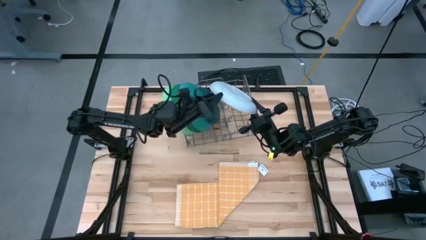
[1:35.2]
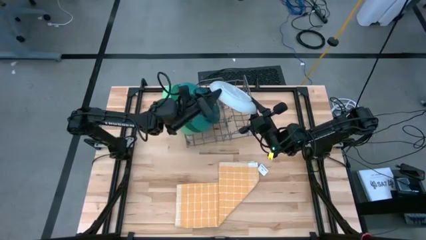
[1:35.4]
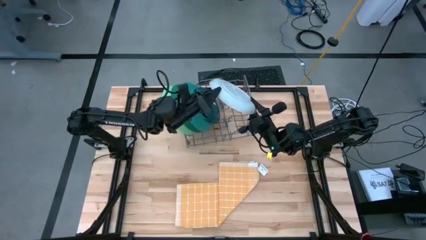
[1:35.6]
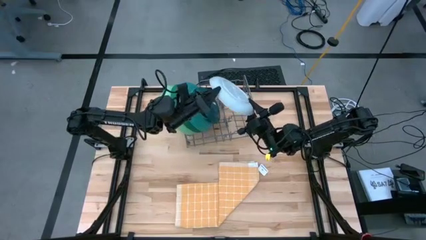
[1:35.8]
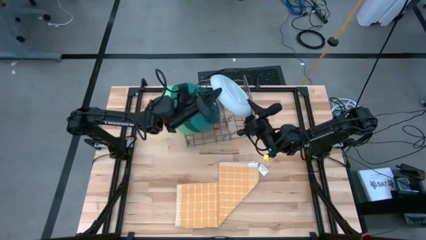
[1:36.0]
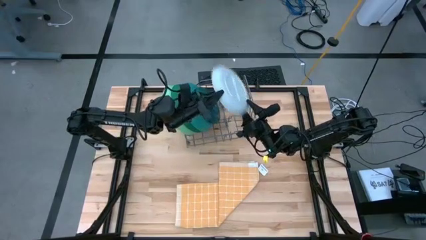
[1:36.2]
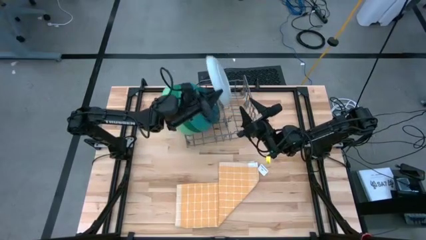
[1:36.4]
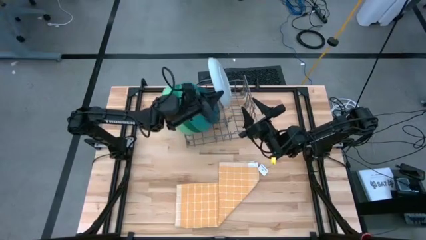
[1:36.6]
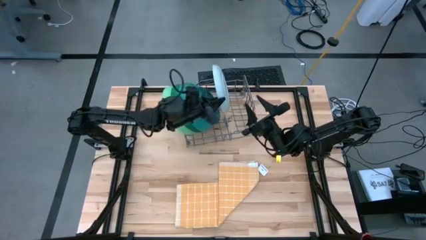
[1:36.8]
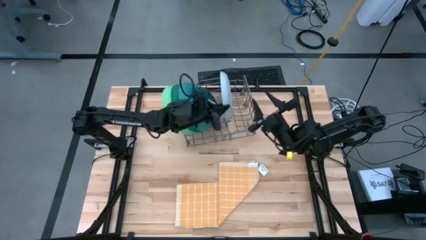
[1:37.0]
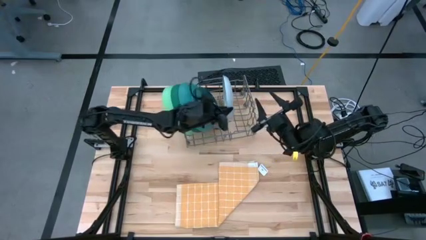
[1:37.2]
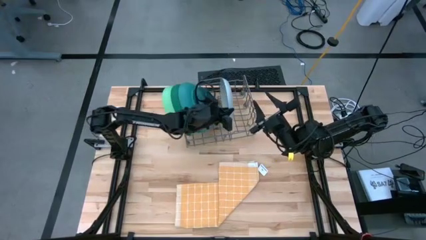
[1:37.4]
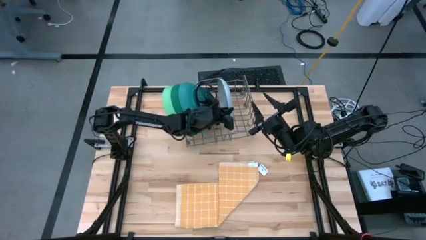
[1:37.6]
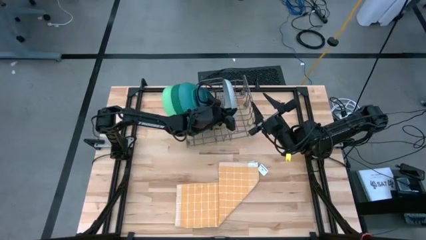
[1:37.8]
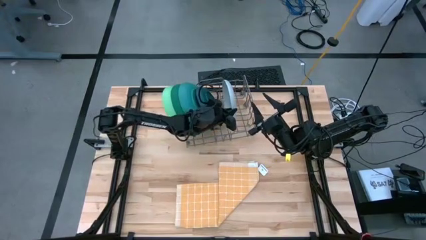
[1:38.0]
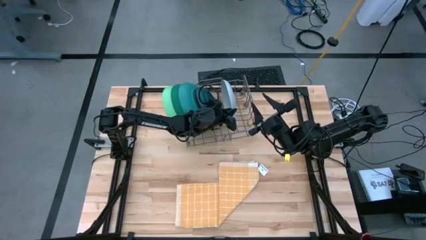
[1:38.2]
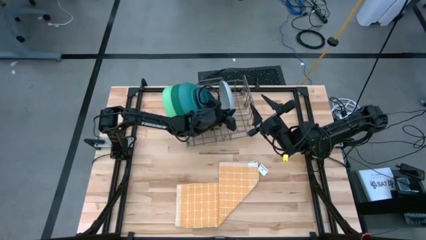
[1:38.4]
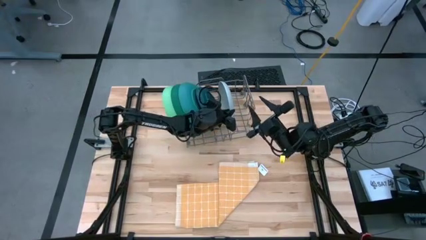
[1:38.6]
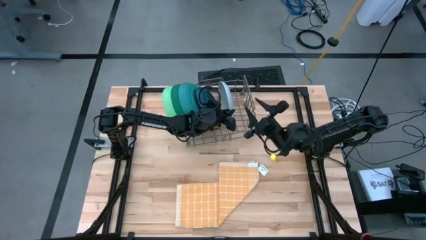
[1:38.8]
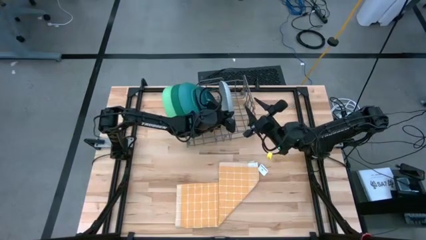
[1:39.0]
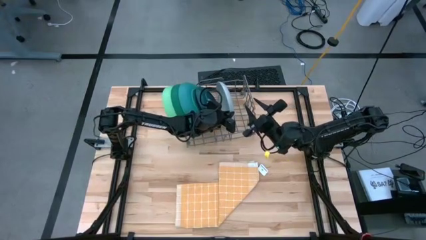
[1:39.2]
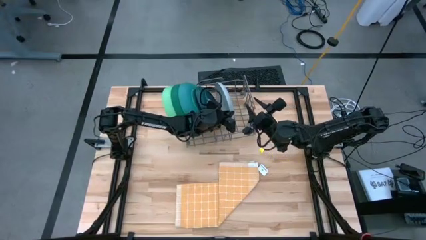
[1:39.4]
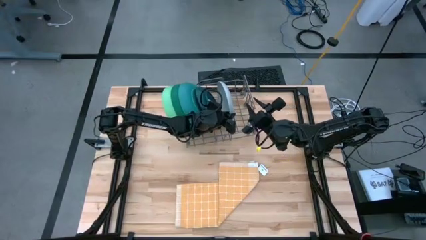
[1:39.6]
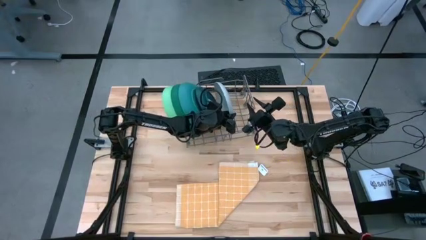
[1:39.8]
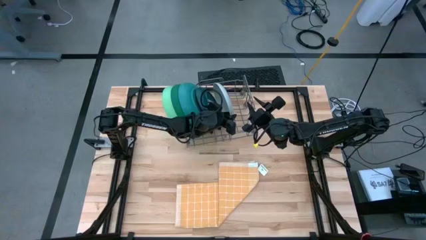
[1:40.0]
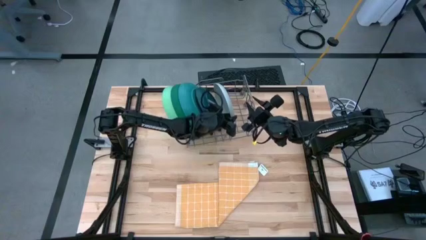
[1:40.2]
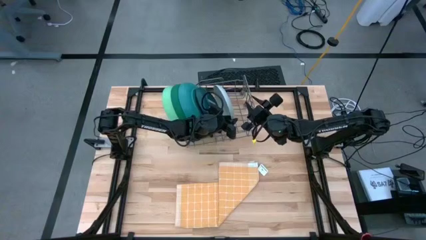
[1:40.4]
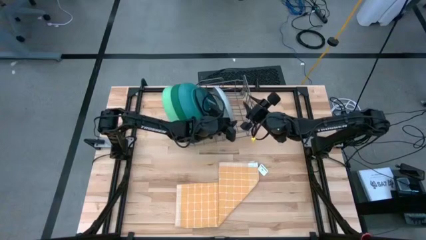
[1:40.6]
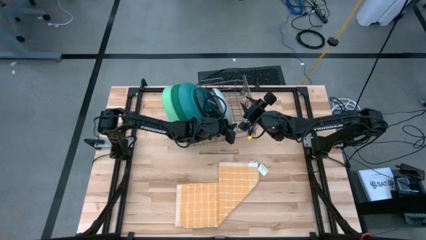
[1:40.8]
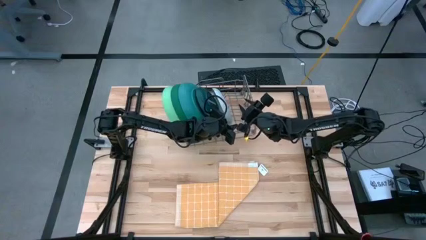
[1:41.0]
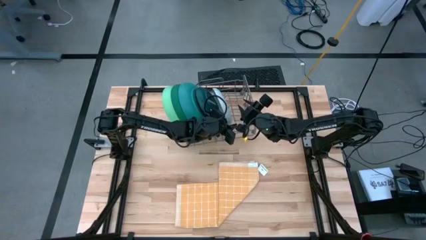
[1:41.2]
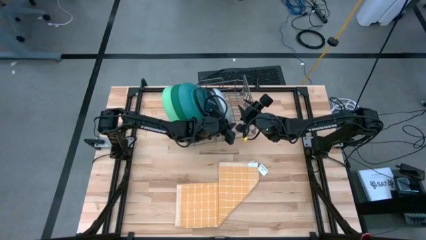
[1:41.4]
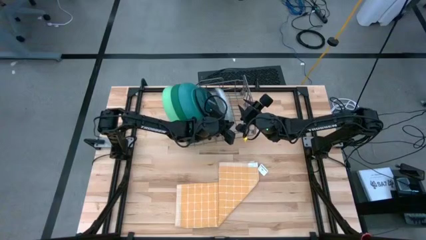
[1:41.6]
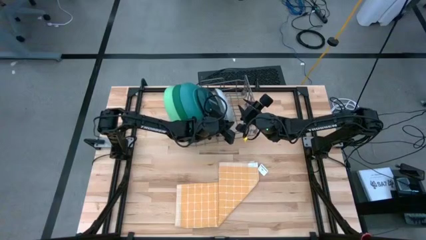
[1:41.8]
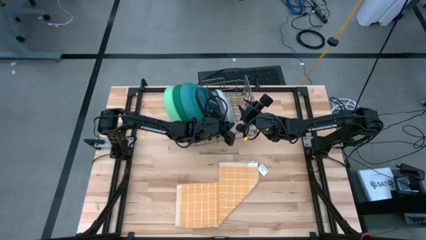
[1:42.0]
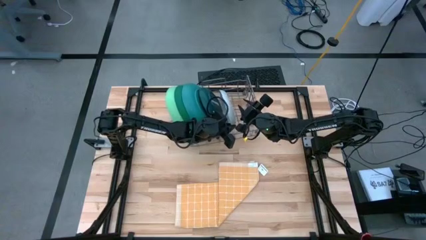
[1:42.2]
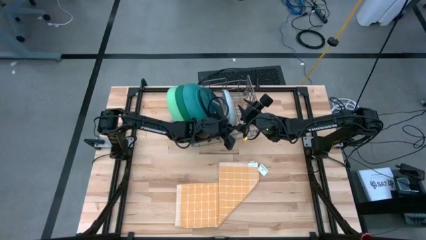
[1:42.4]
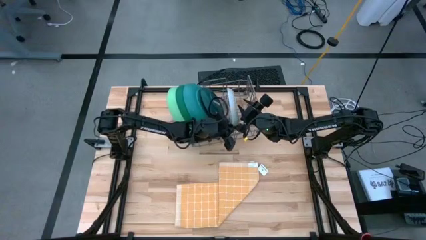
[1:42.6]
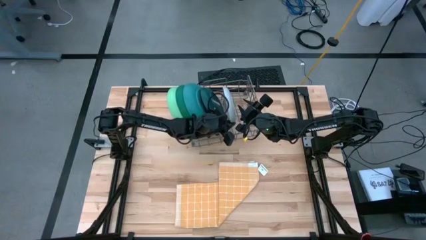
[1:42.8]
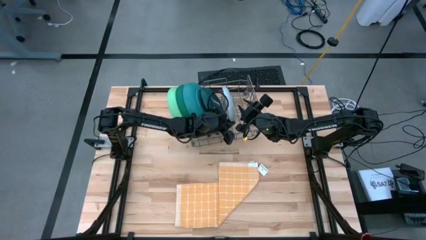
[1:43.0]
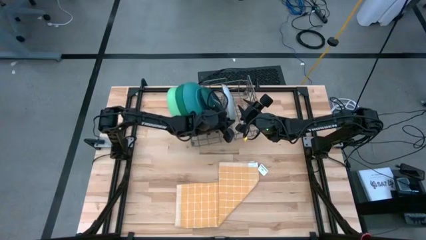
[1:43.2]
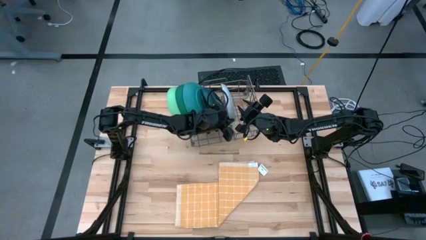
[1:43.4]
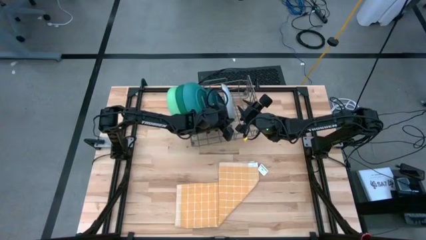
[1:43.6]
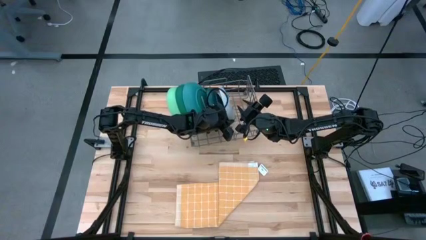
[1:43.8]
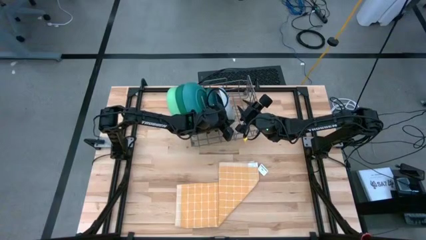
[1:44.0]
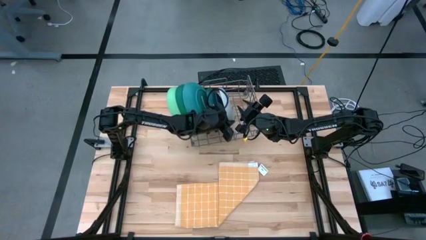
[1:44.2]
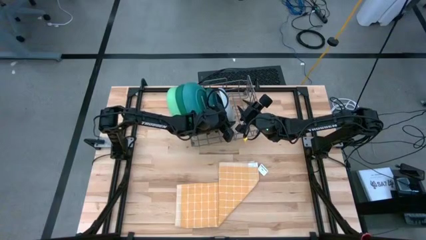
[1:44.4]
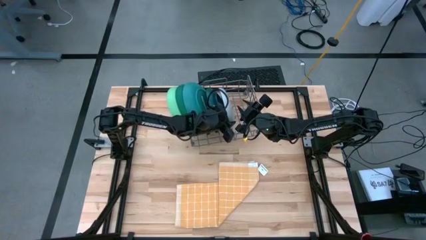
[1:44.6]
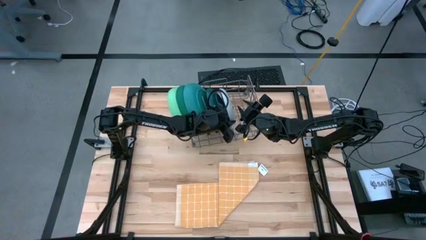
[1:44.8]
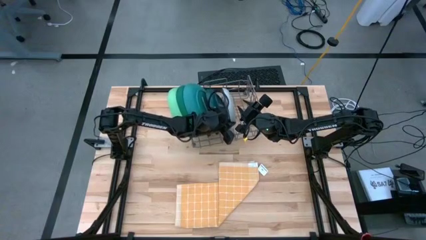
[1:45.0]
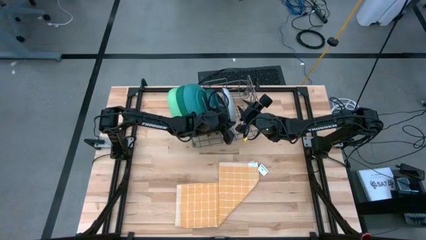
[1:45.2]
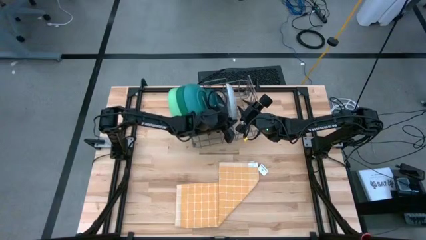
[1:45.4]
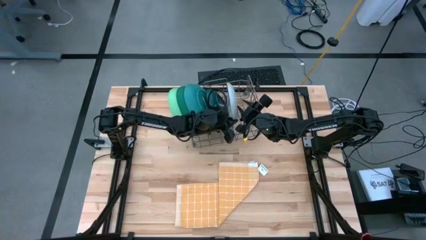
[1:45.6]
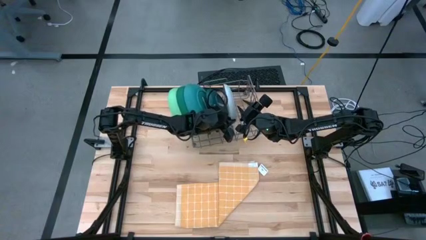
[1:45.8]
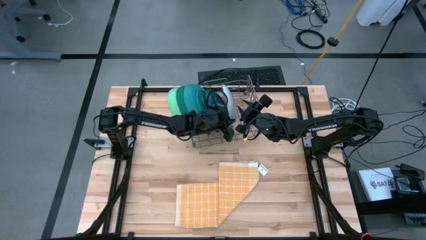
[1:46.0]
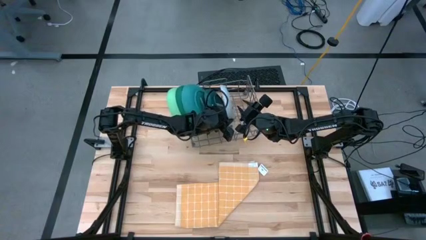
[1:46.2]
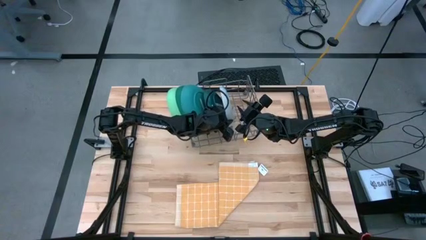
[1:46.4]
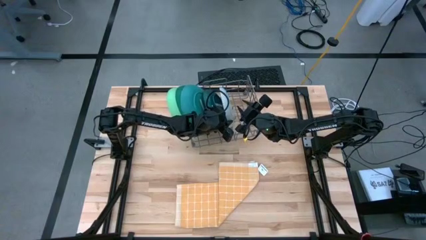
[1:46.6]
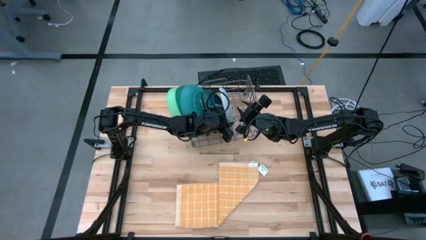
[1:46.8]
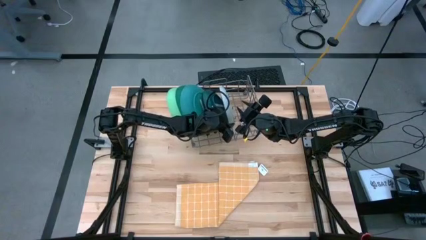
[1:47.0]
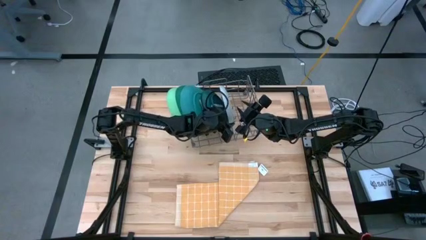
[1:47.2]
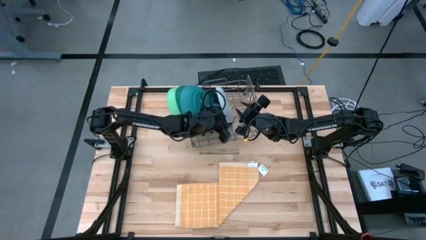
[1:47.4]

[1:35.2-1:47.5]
Task: Sort dishes
Put the white plate on the dish rack

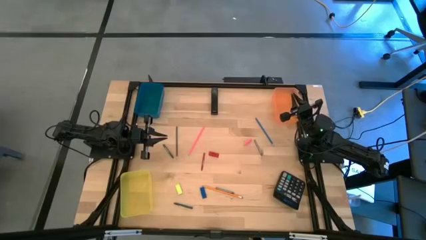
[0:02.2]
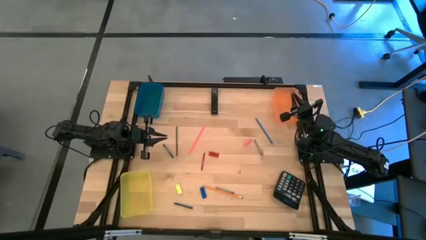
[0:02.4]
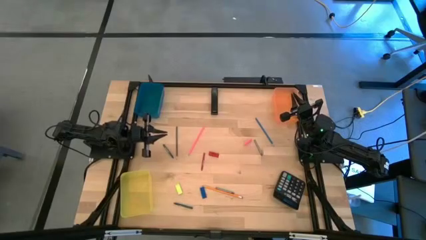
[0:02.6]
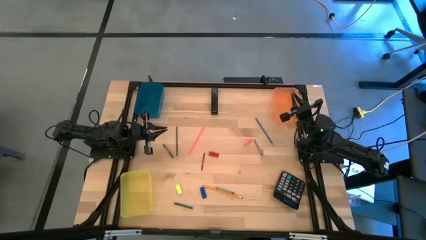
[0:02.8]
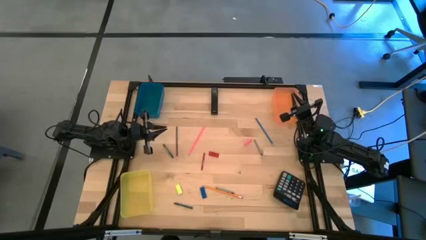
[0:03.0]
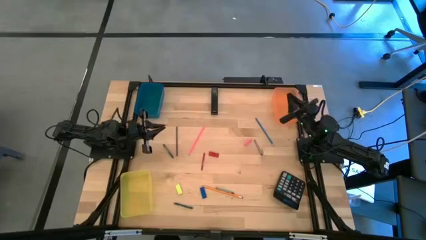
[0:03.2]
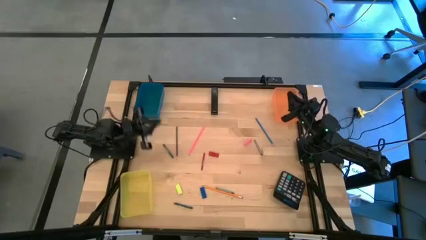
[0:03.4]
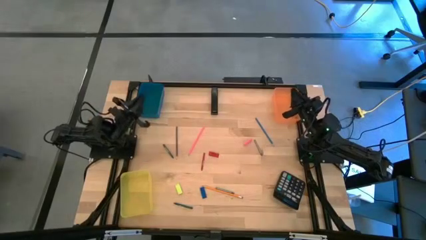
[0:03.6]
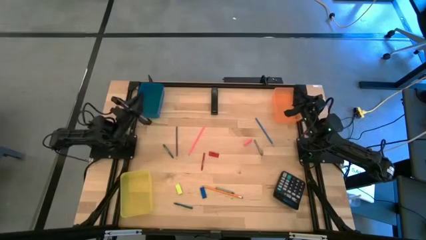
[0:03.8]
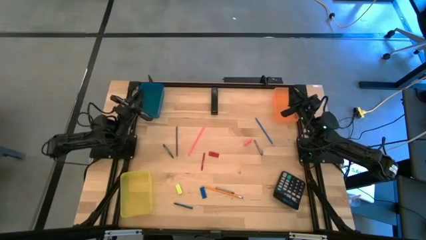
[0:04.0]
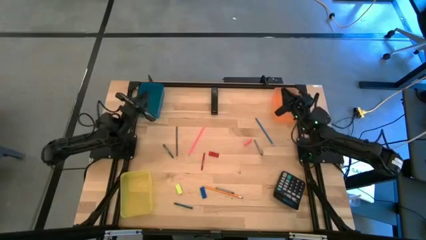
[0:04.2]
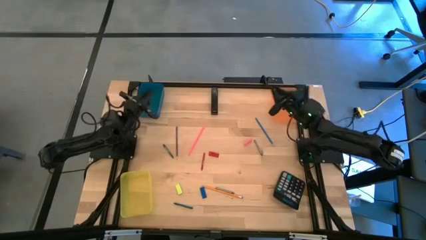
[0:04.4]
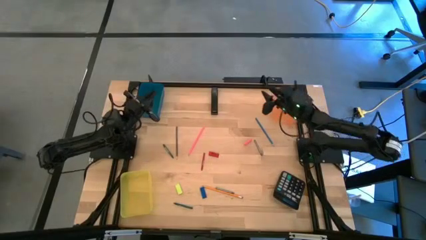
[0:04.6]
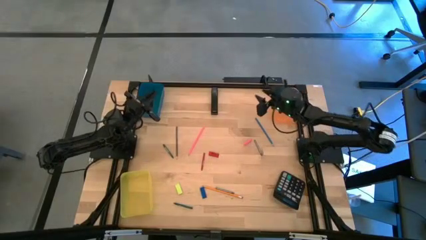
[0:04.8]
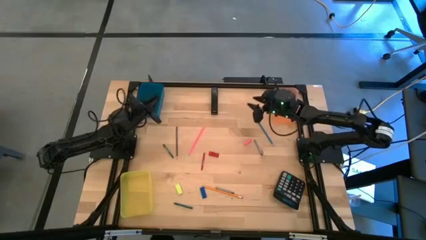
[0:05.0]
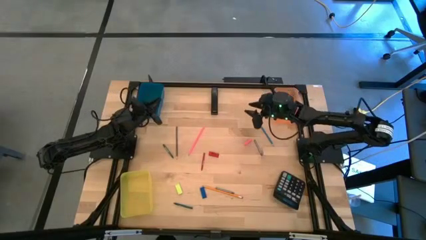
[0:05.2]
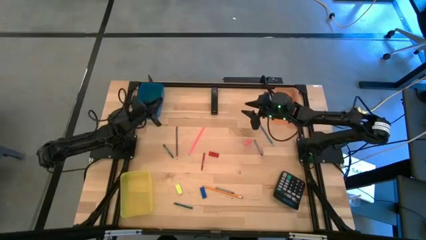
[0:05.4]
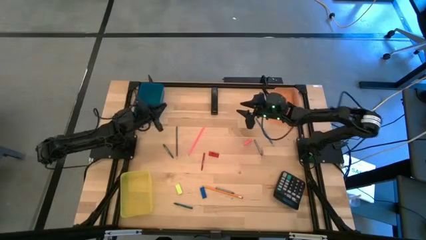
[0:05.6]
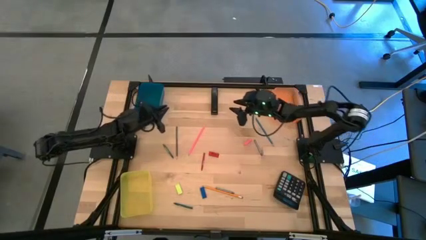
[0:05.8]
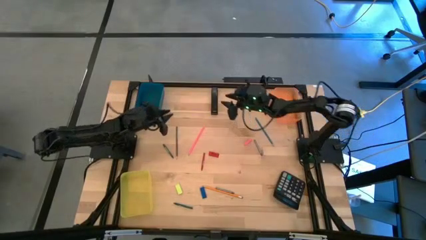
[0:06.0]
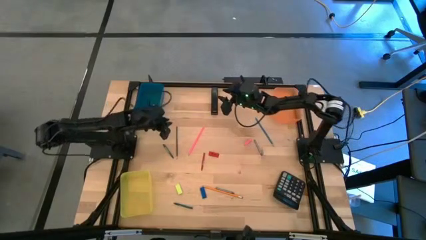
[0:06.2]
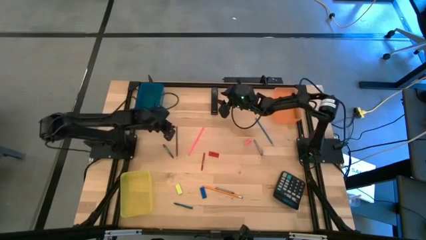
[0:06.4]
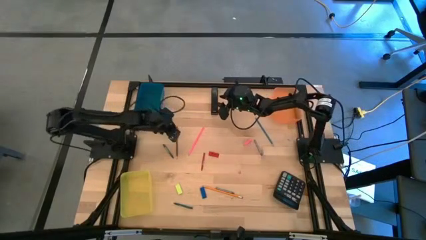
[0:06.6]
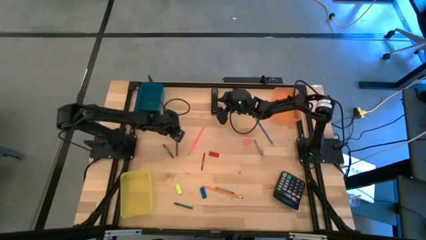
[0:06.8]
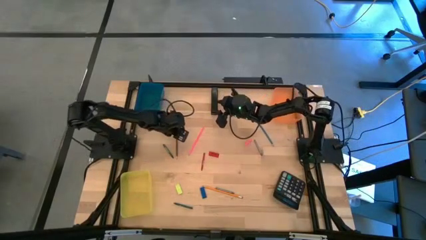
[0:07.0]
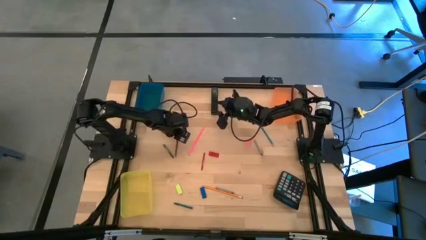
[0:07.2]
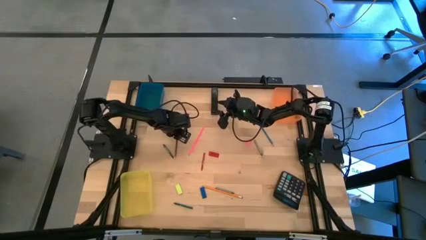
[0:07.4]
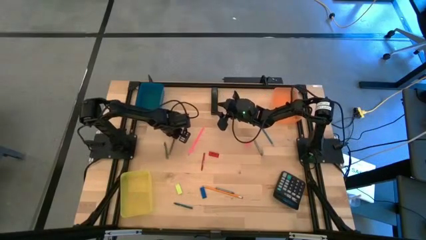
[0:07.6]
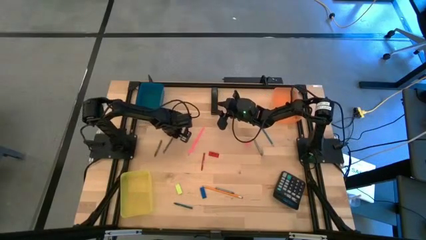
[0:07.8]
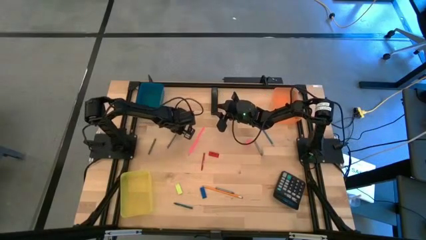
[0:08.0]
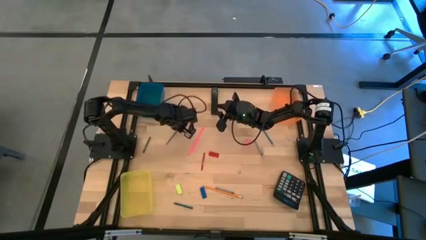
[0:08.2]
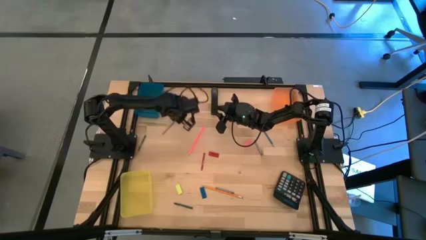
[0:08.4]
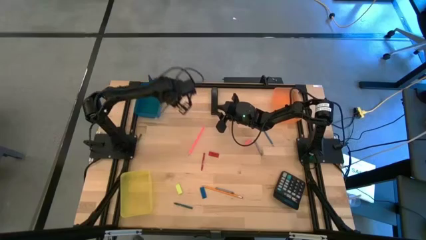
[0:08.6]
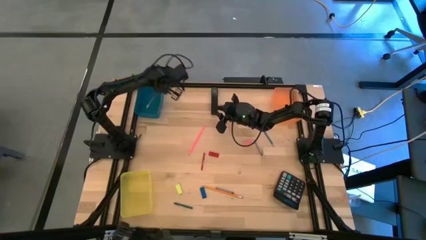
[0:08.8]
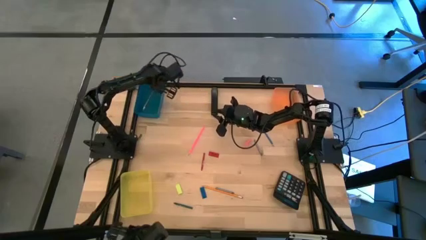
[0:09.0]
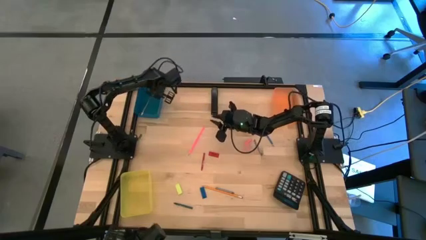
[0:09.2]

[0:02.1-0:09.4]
Task: Sort crayons/erasers/pens/pencils in bins
Put the black pencil into the blue bin
